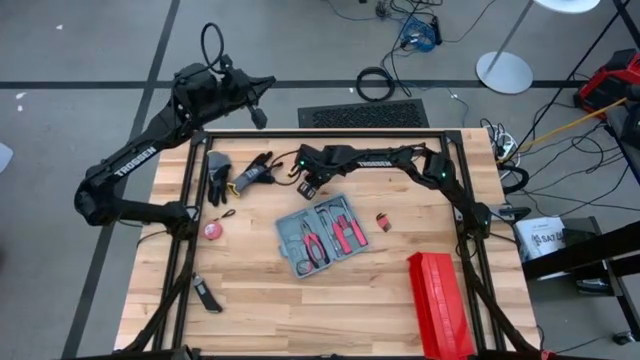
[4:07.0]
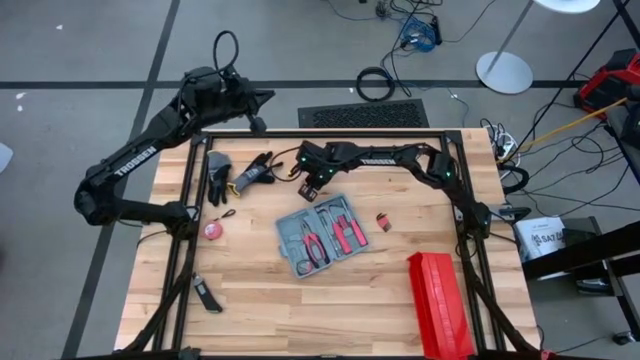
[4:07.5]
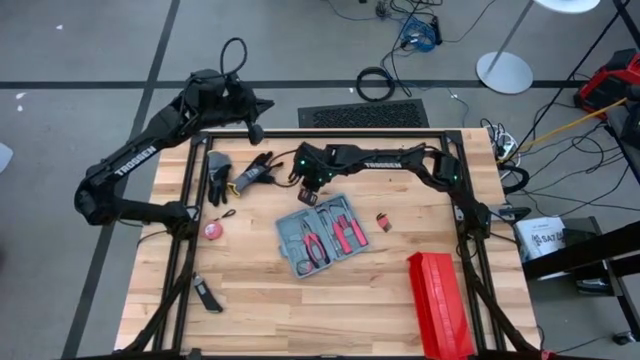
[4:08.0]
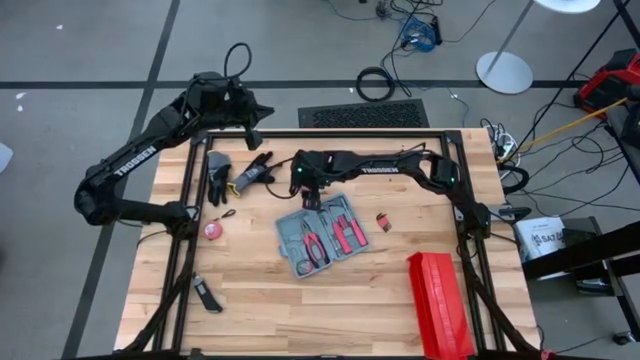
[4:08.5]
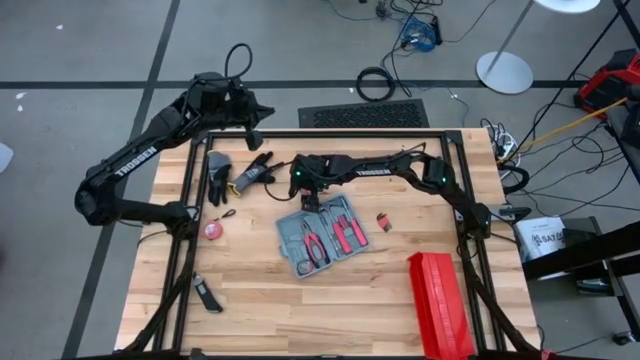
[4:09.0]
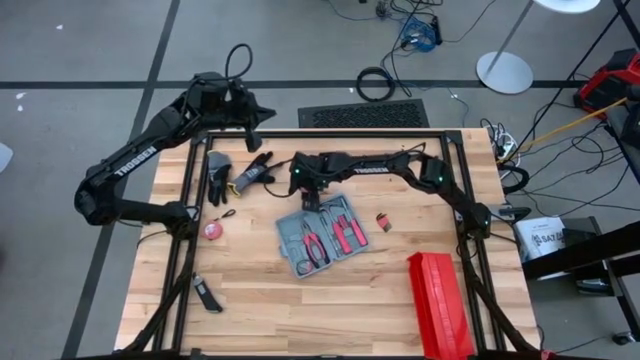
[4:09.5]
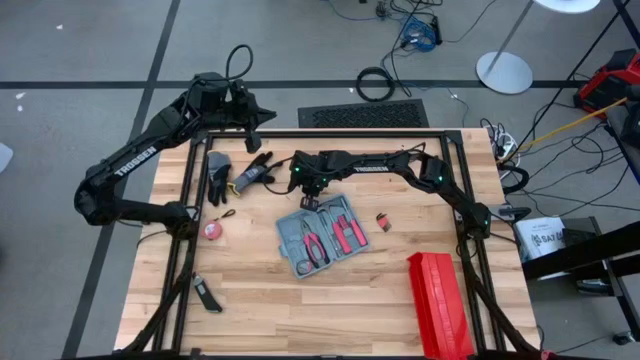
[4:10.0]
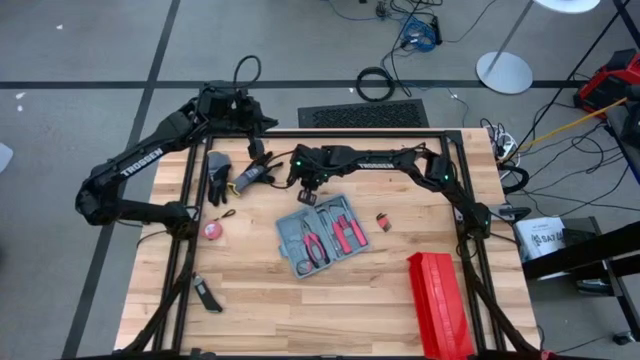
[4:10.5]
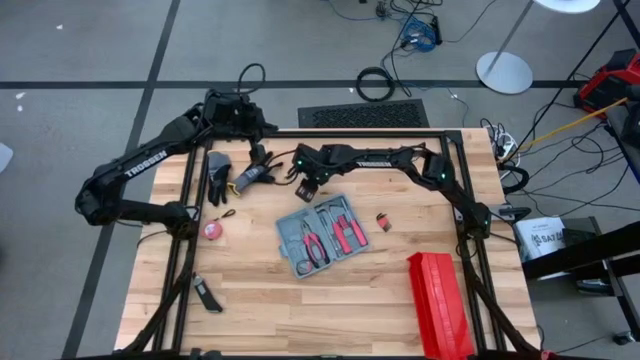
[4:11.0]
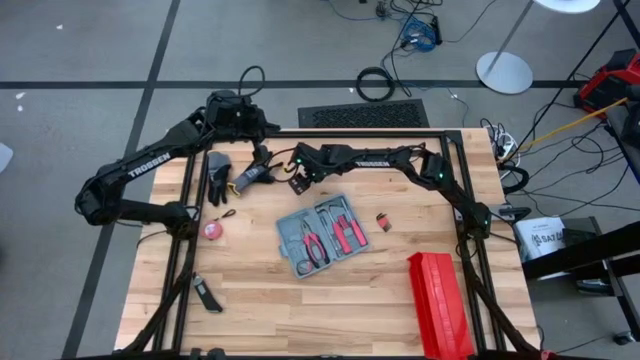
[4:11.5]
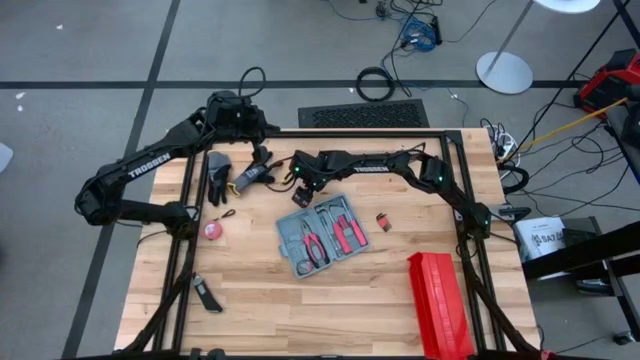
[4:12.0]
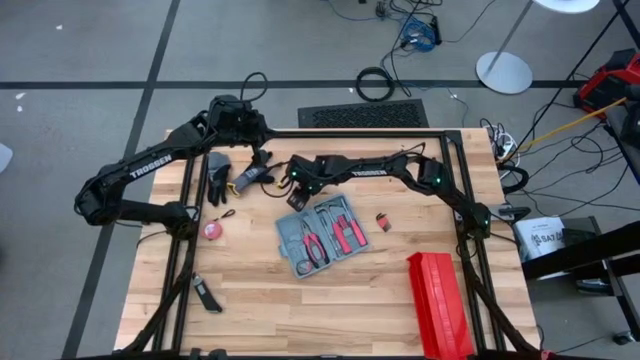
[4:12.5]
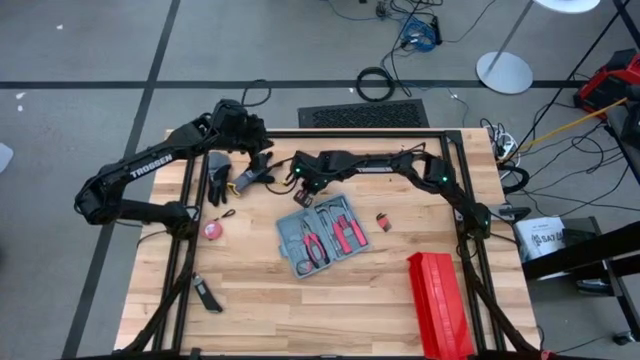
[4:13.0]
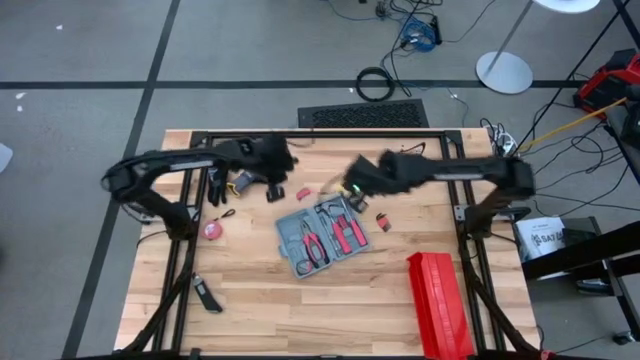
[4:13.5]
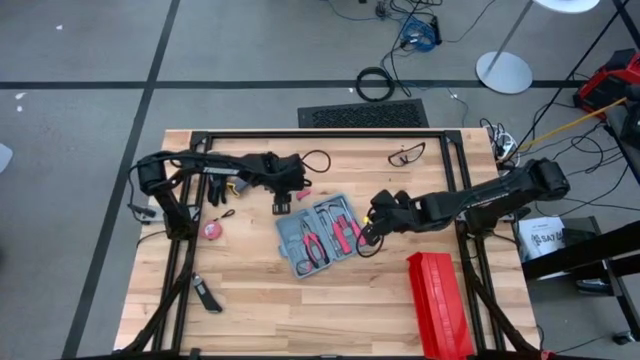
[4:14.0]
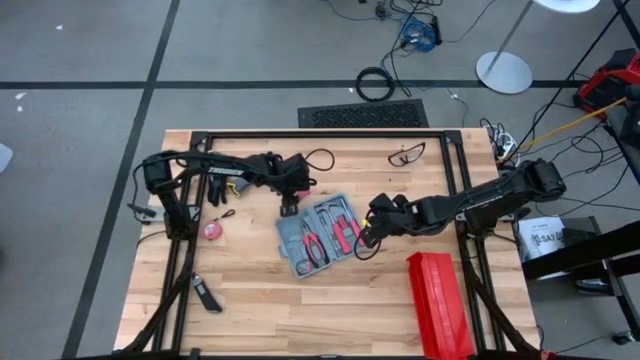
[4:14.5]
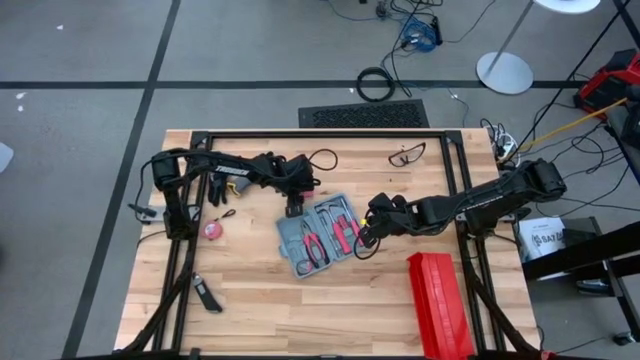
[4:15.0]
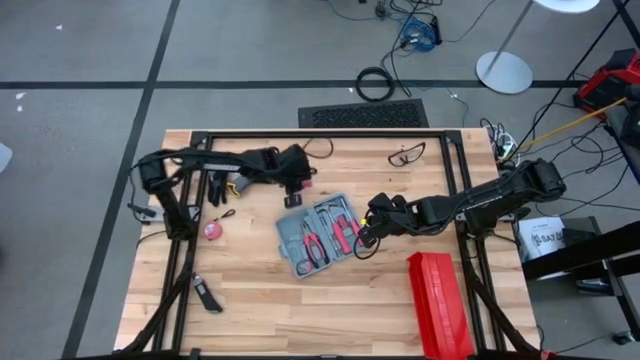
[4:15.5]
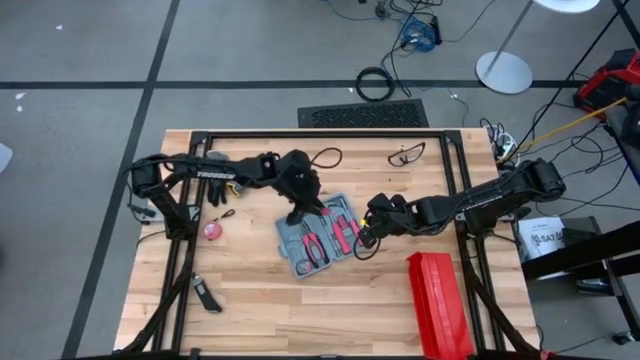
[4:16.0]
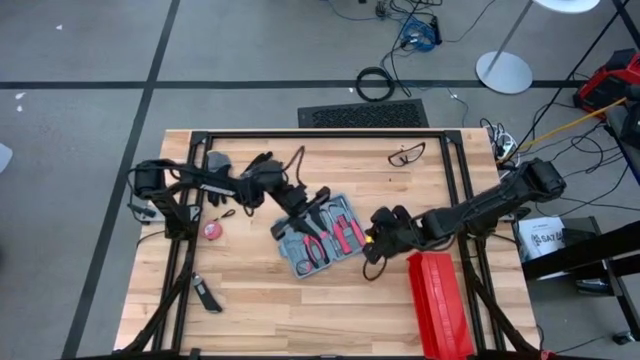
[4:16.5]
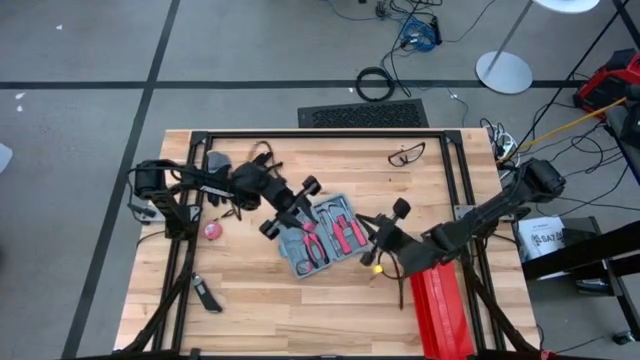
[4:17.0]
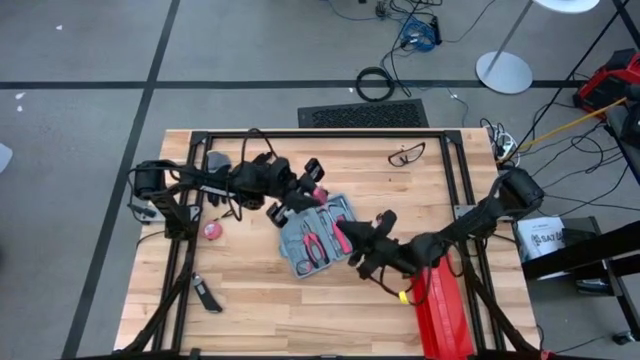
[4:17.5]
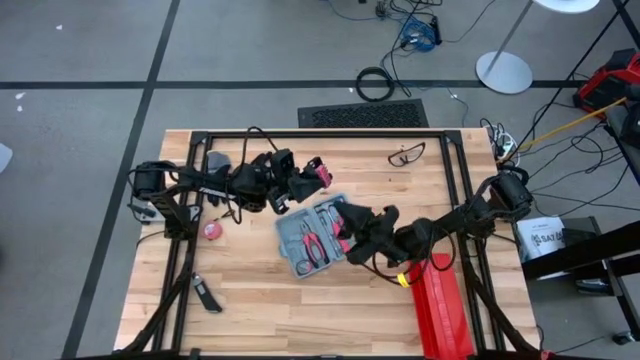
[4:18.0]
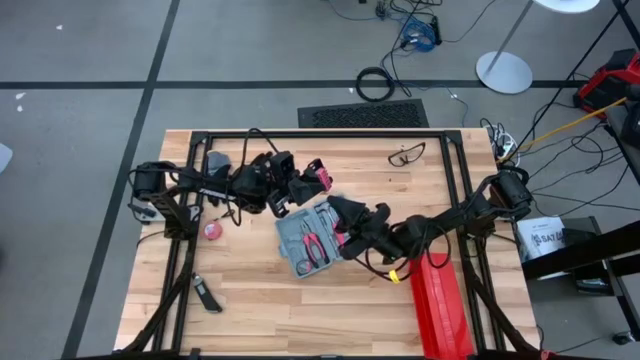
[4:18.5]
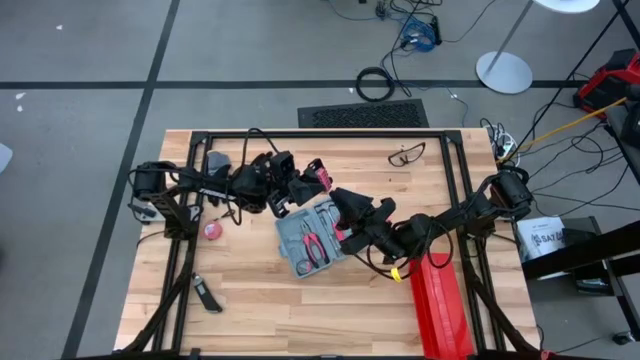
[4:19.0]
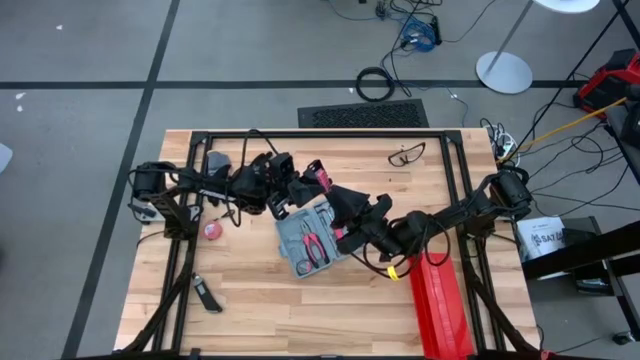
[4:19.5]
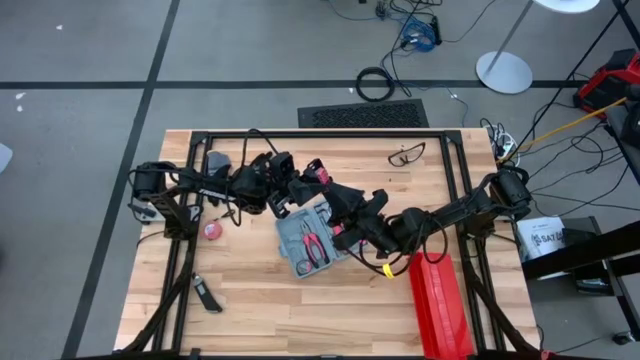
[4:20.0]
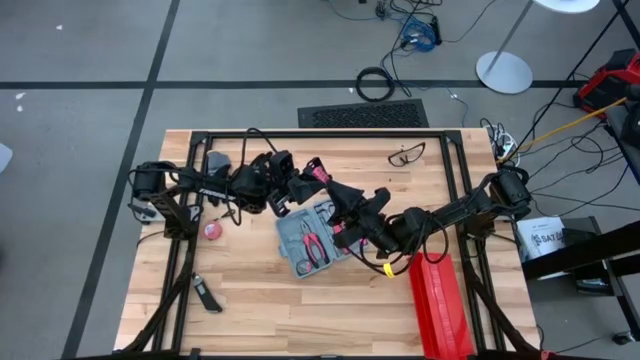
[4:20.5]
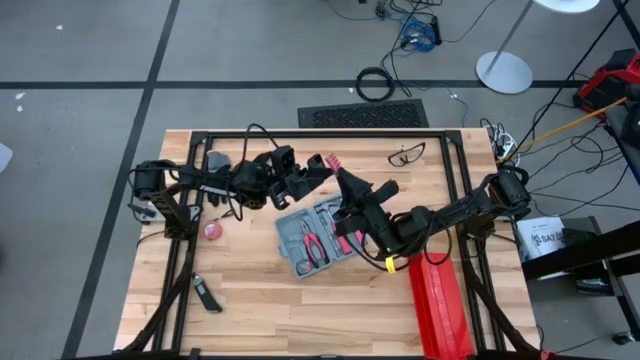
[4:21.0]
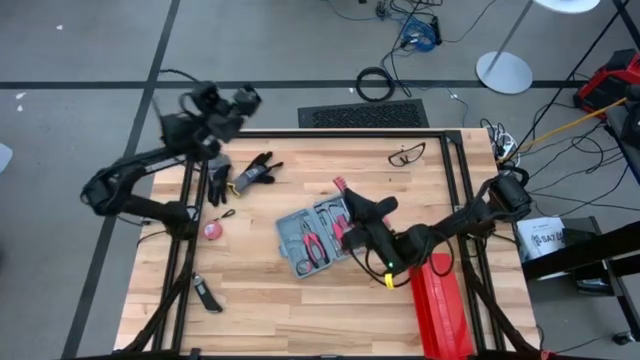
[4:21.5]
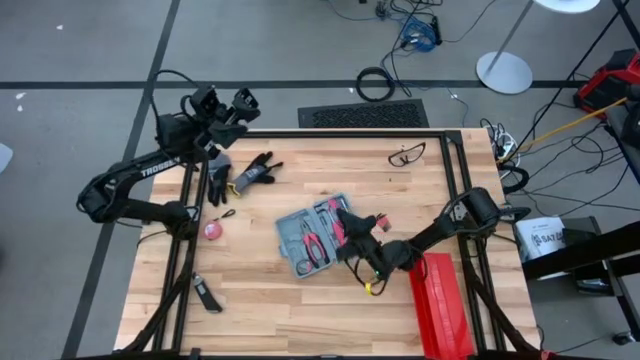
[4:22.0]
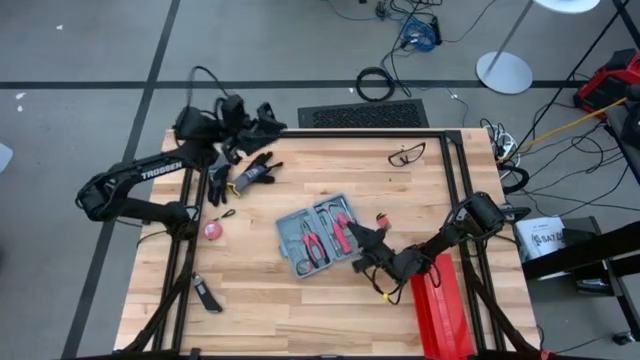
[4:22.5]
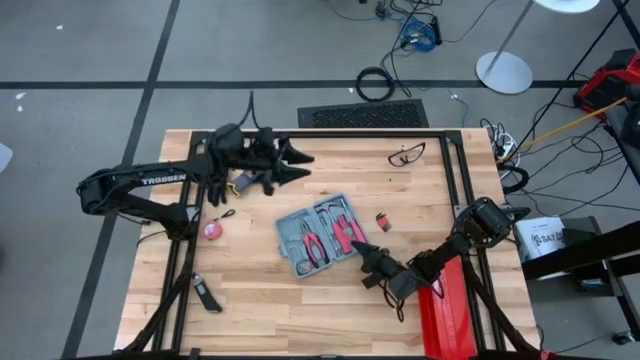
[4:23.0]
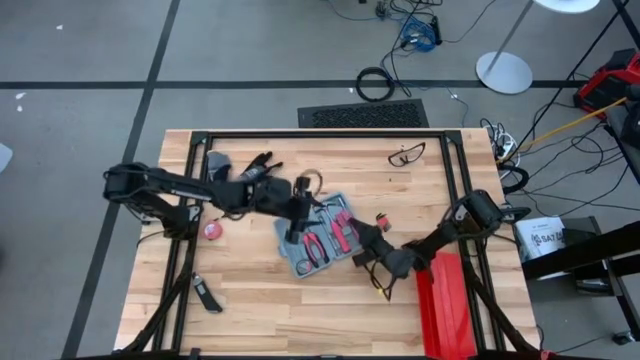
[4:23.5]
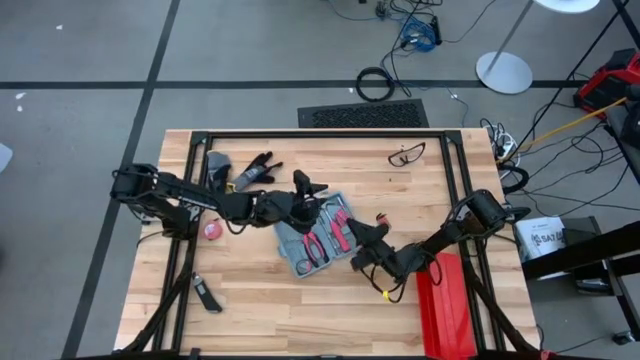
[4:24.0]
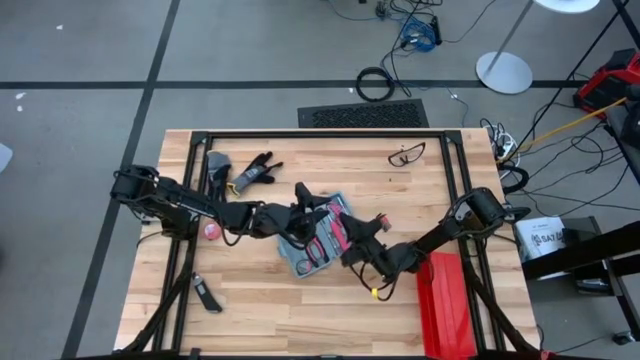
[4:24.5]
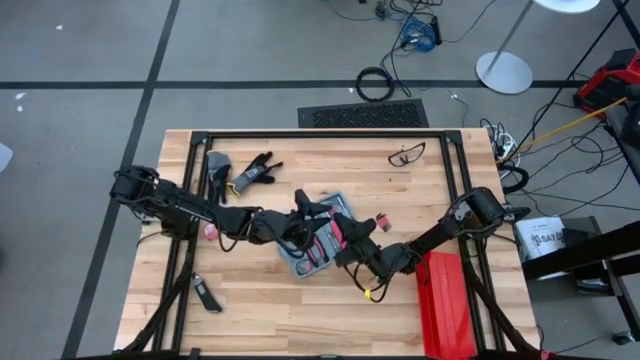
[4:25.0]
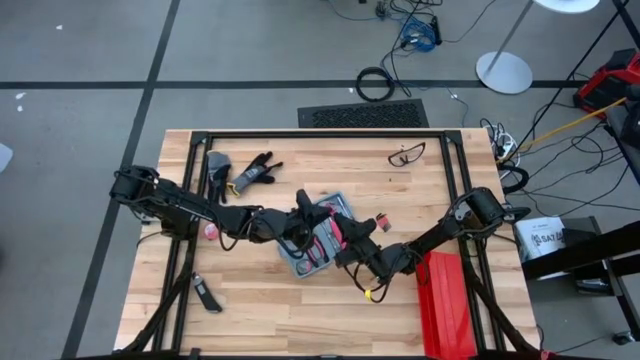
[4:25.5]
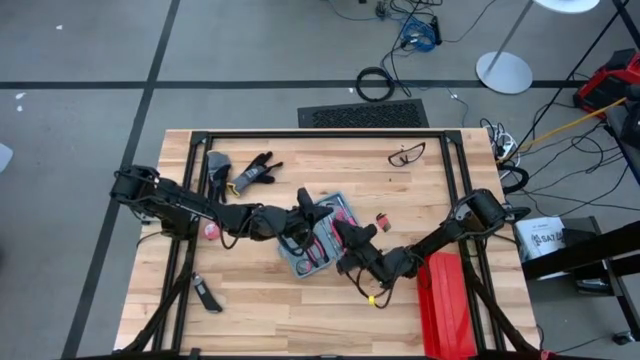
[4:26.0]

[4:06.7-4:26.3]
Task: prefit tool cases
Put the red terminal block into the gray prefit tools case

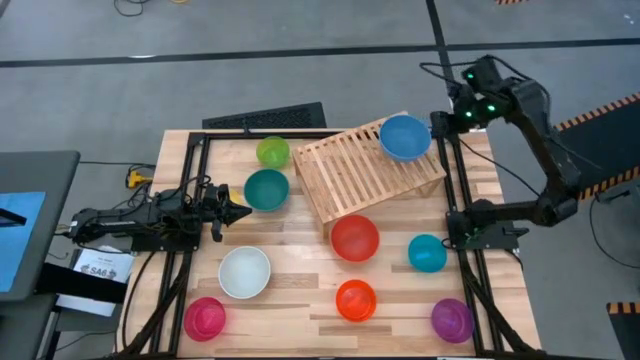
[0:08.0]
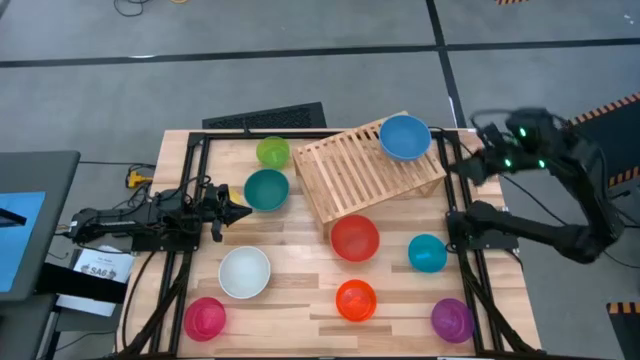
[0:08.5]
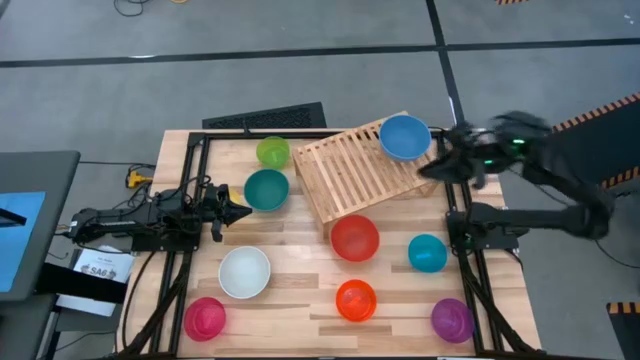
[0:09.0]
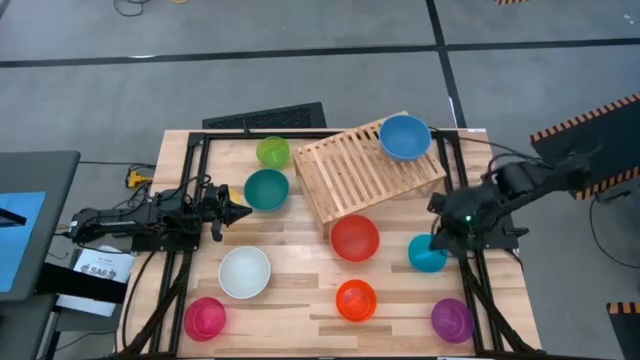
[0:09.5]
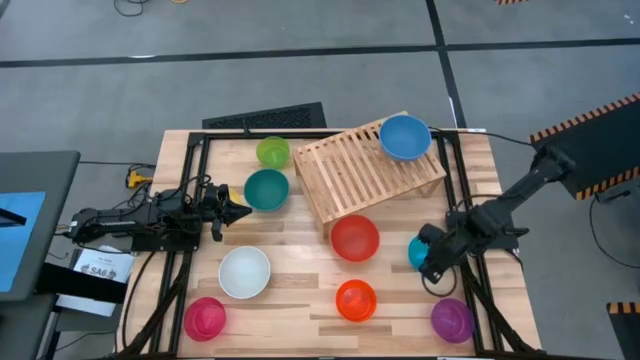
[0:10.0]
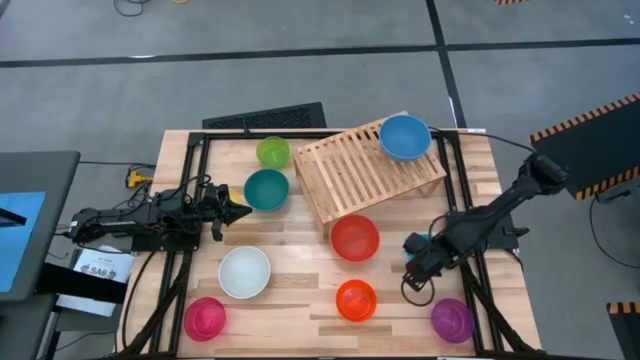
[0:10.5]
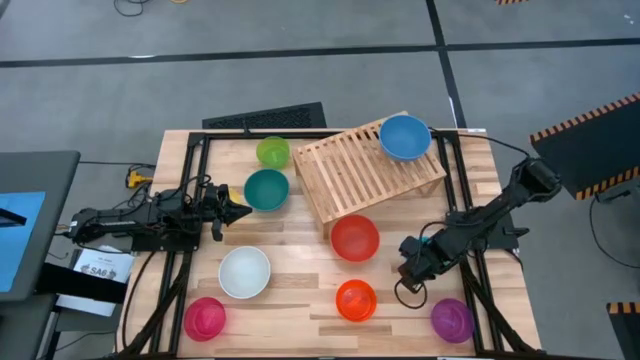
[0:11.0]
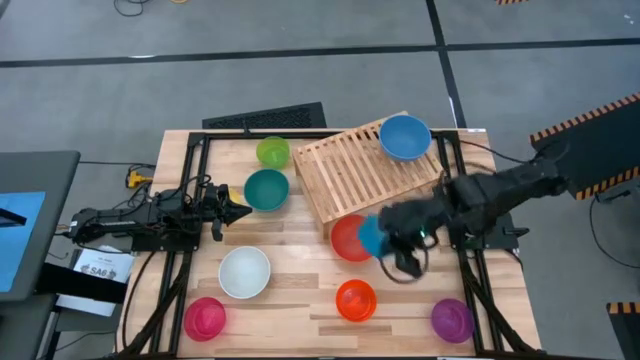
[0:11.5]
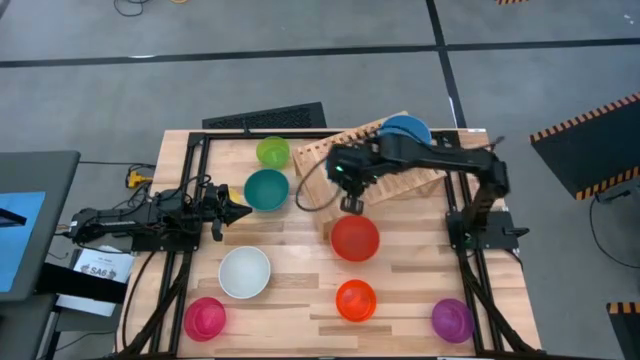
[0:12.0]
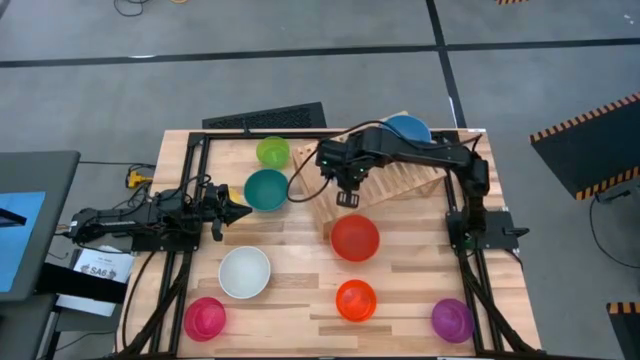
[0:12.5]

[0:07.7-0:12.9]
Task: Place and stack bowls onto a shelf
Put the small blue bowl on the shelf
